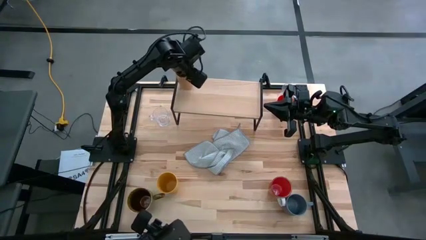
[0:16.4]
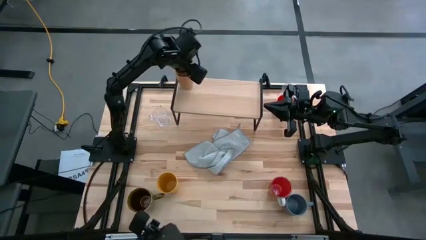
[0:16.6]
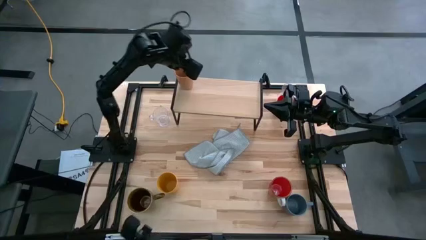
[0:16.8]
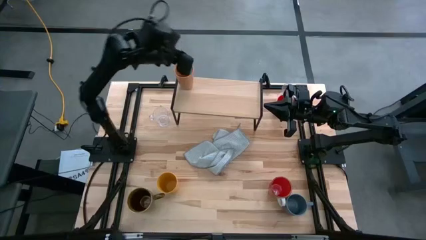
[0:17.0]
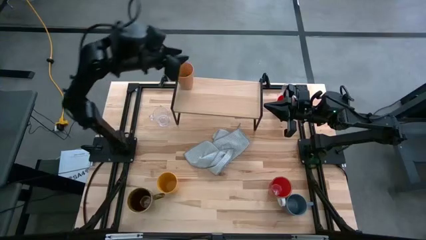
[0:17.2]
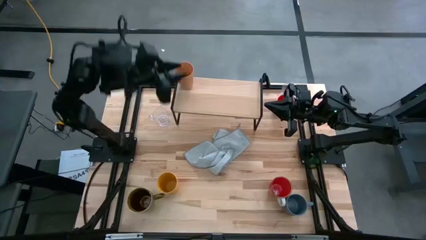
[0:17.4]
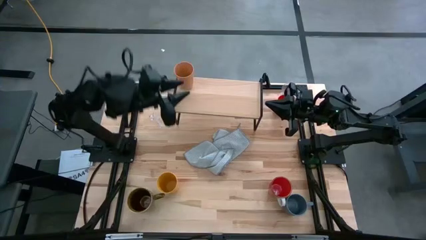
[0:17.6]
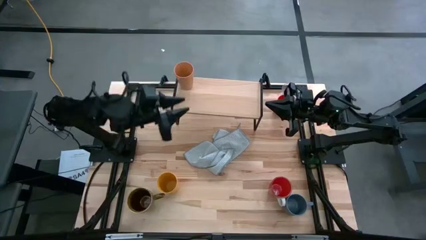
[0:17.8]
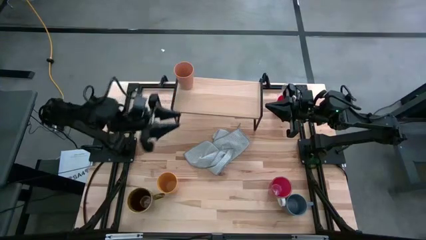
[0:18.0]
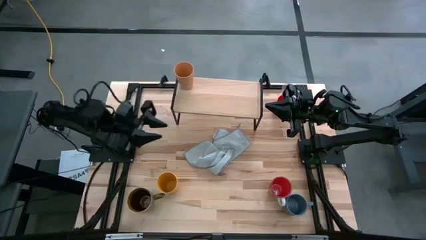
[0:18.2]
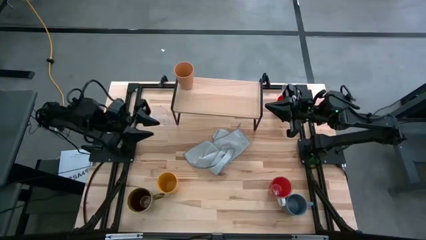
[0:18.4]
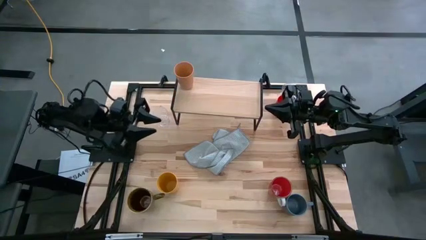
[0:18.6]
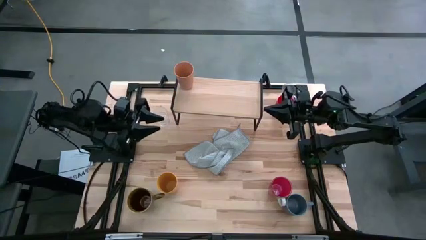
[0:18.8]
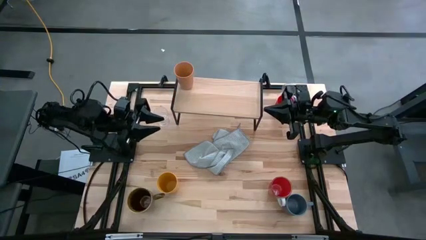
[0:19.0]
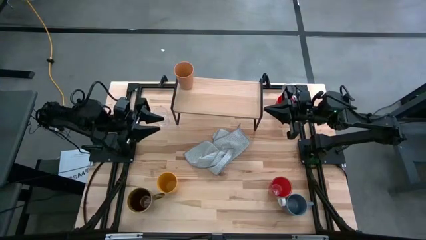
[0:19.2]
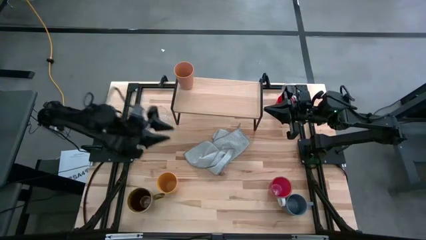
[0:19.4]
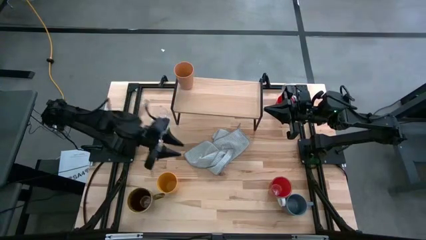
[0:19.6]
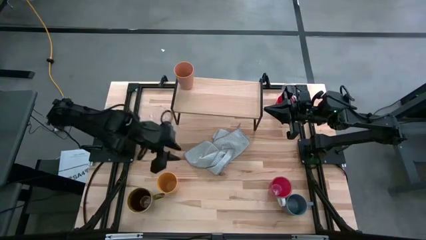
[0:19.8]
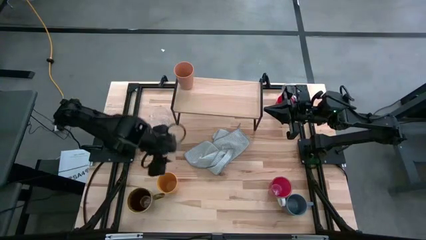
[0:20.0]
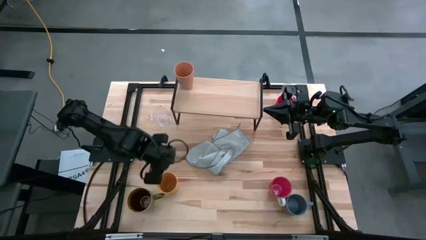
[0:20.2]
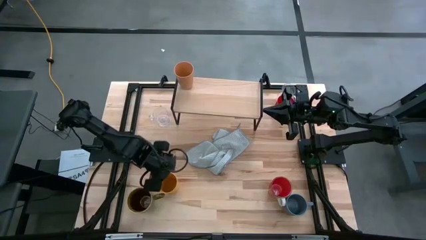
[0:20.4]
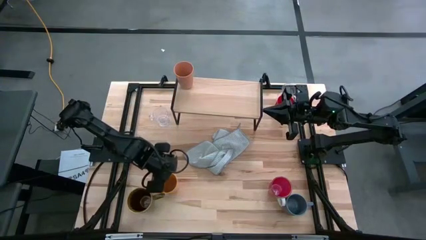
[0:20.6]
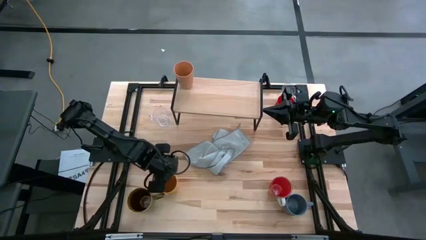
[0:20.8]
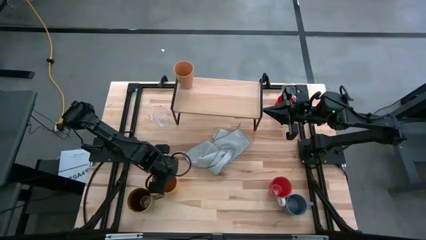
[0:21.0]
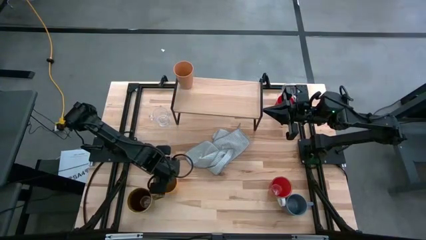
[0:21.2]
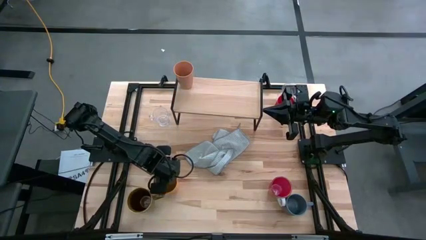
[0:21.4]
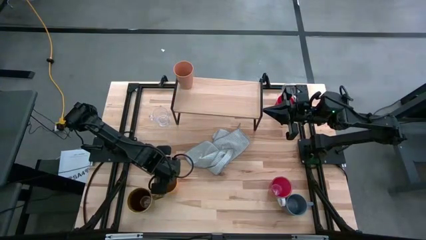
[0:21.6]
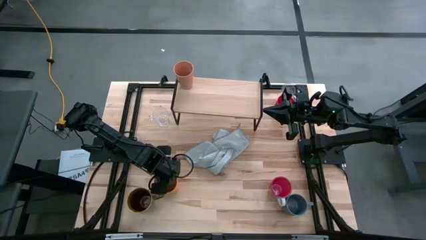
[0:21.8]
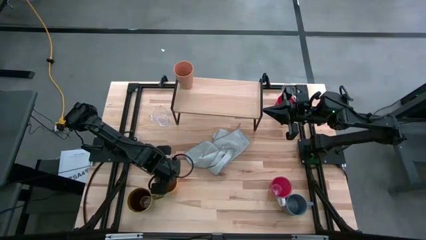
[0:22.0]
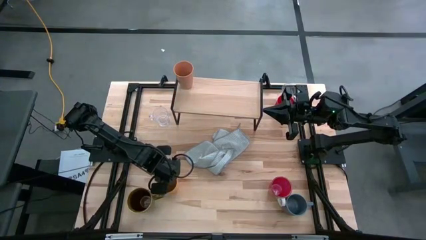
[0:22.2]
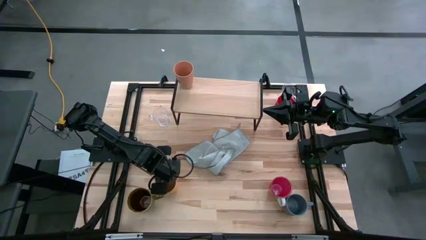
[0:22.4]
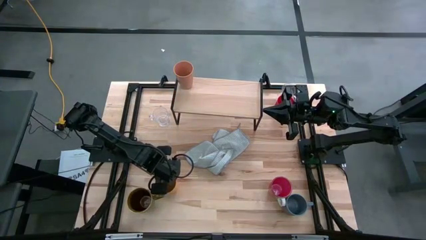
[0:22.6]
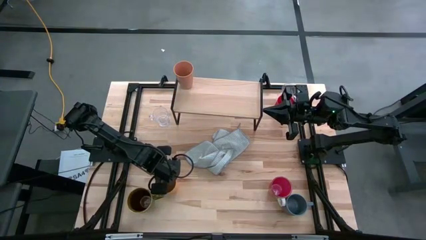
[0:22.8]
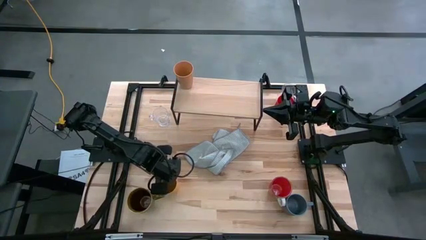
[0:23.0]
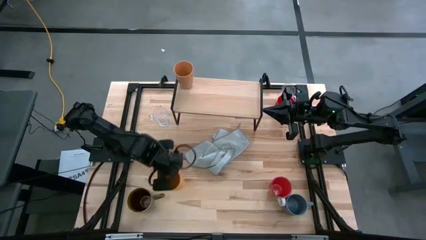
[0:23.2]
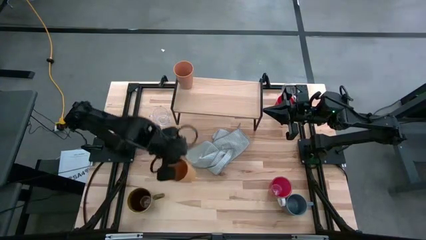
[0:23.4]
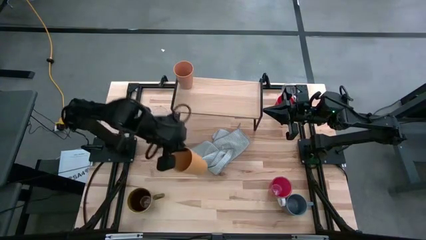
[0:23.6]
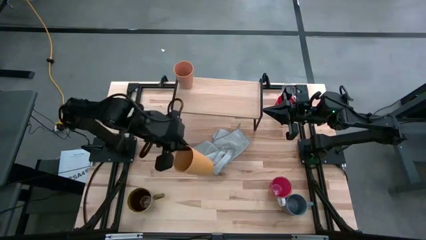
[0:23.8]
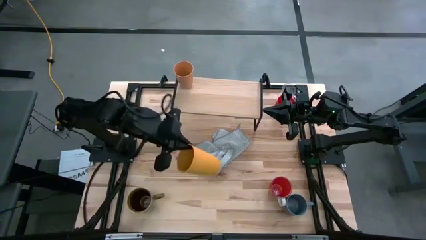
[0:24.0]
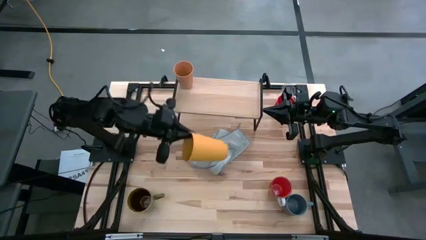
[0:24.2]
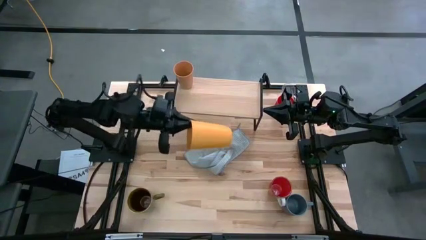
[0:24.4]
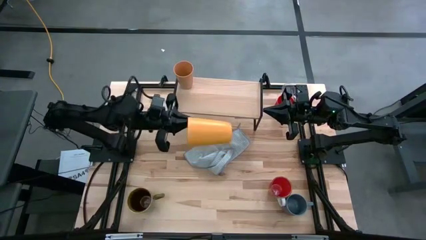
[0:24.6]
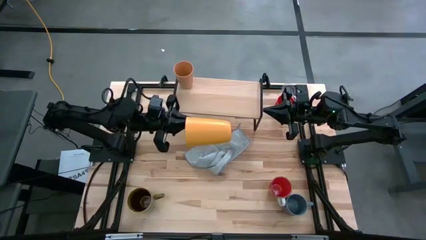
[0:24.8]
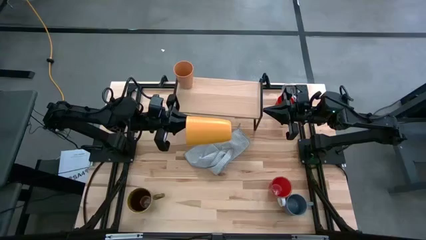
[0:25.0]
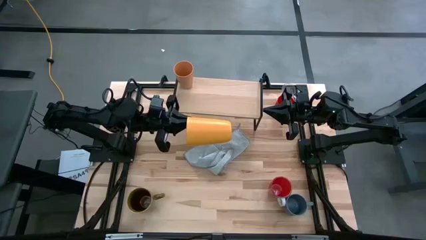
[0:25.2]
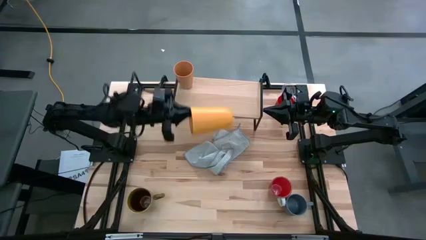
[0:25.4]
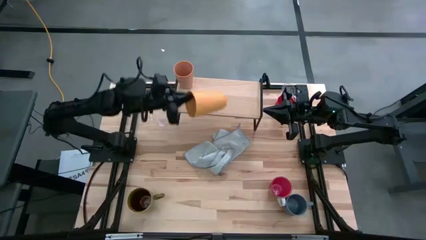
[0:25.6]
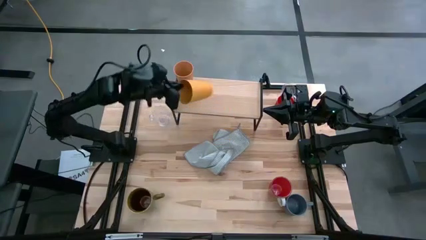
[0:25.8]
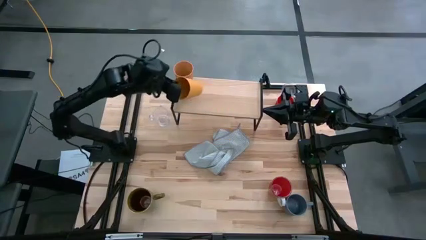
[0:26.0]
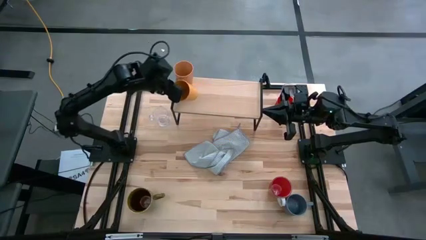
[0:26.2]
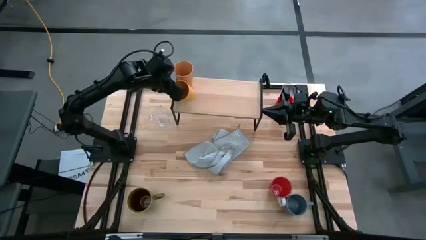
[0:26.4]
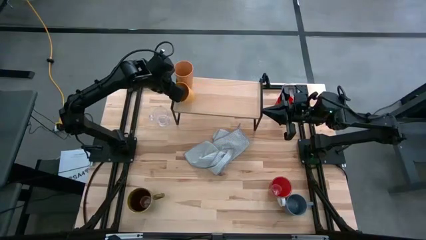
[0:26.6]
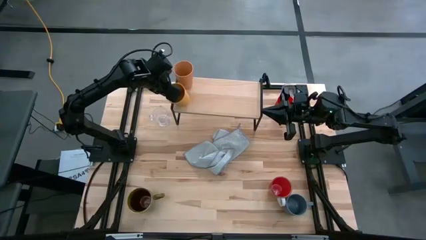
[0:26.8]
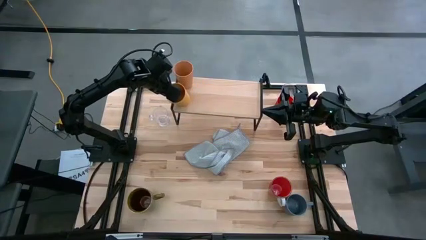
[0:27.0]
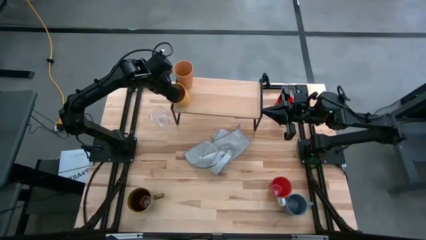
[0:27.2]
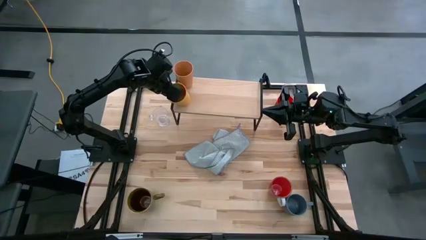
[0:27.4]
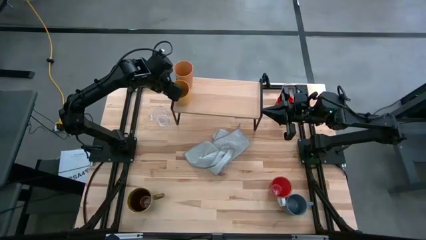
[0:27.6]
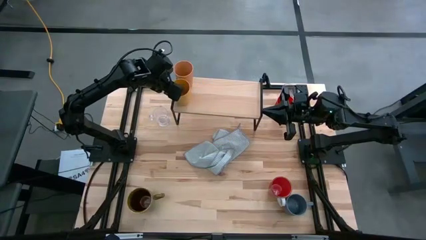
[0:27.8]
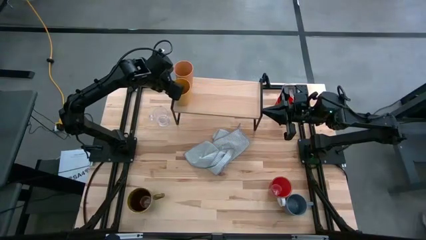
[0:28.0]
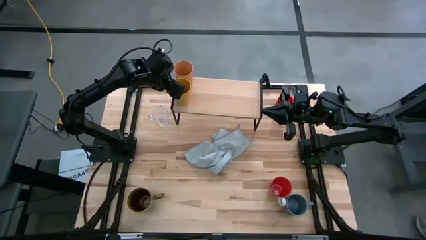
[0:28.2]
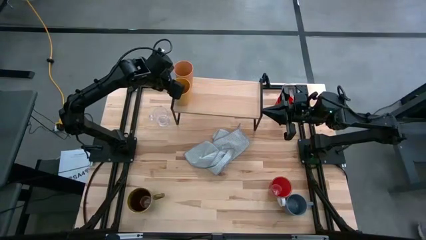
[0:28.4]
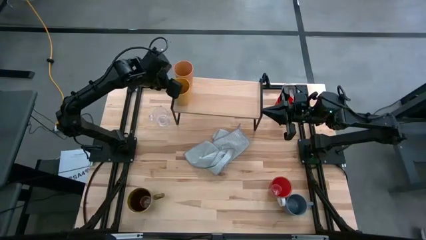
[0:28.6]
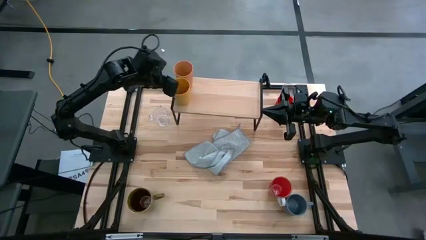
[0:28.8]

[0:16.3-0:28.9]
Task: Stack small to large cups/mugs on shelf
Put the yellow cup on the shelf
